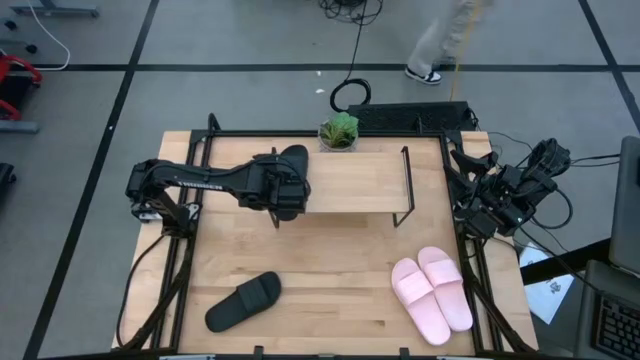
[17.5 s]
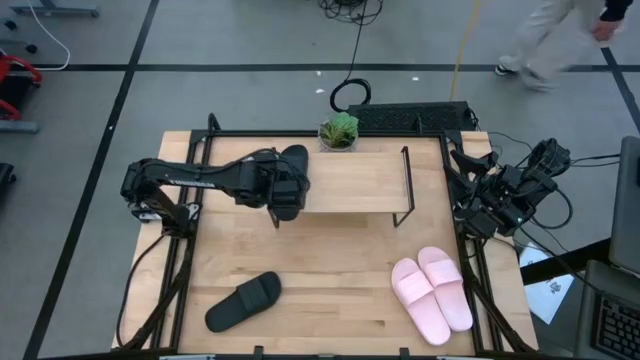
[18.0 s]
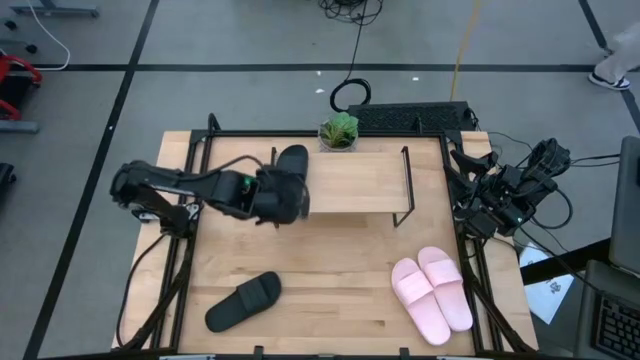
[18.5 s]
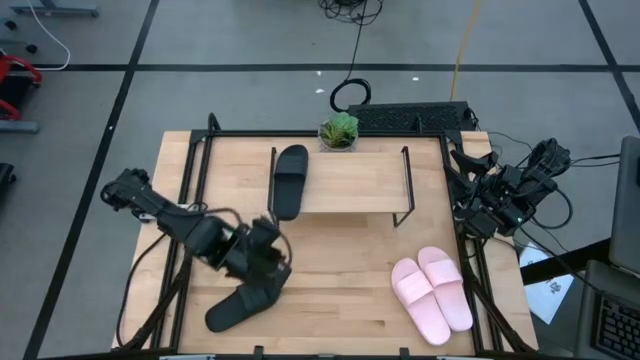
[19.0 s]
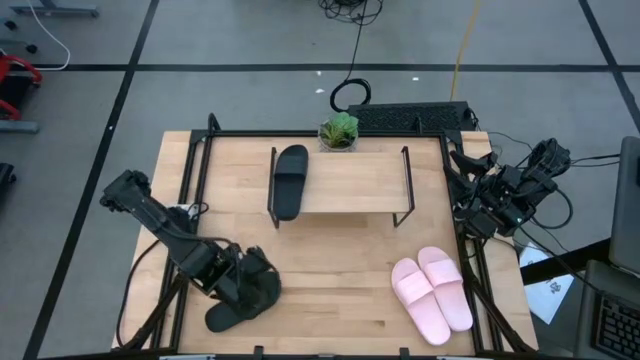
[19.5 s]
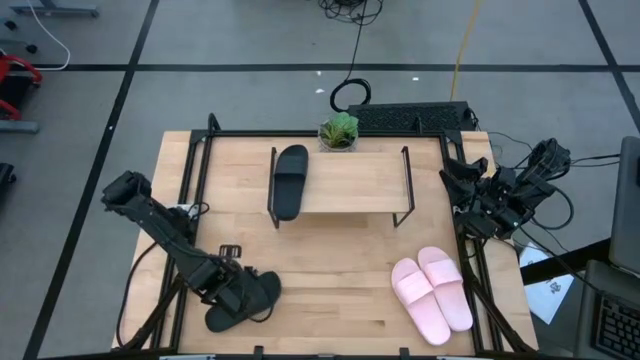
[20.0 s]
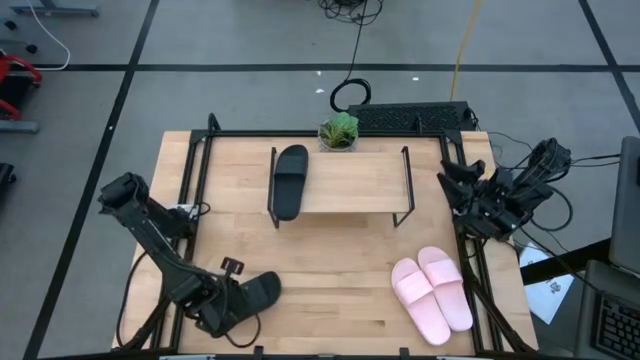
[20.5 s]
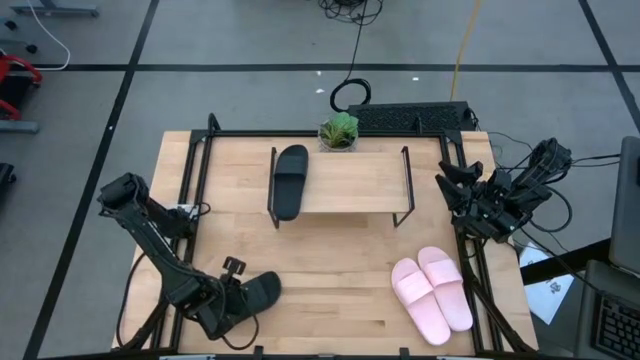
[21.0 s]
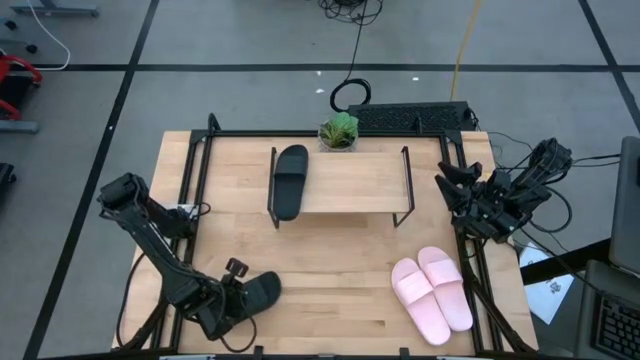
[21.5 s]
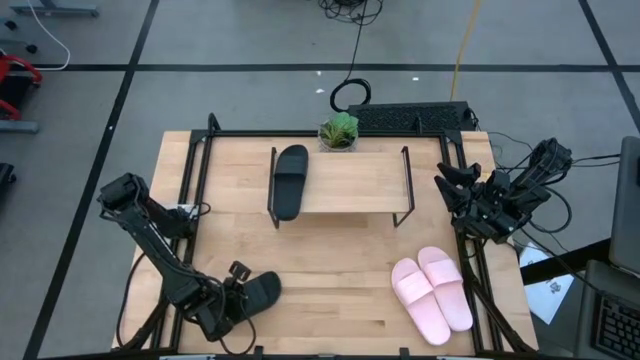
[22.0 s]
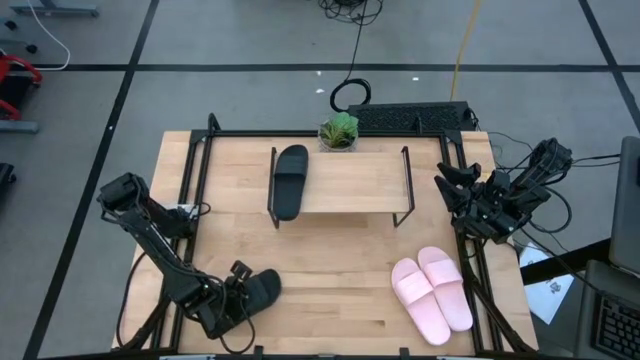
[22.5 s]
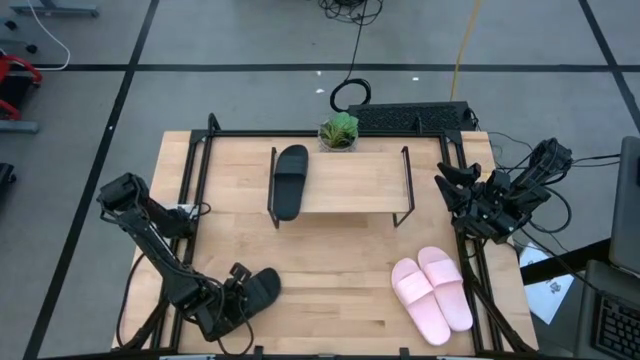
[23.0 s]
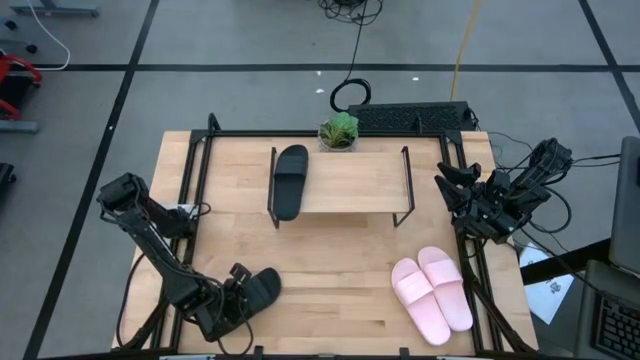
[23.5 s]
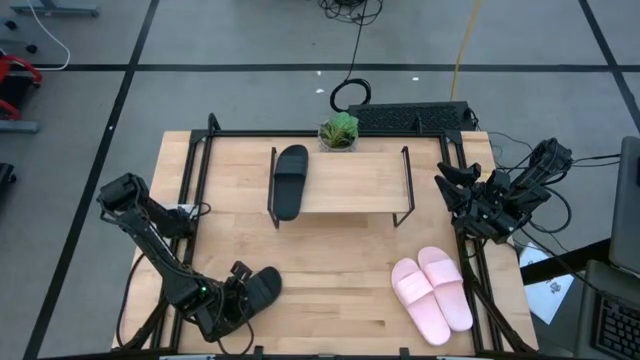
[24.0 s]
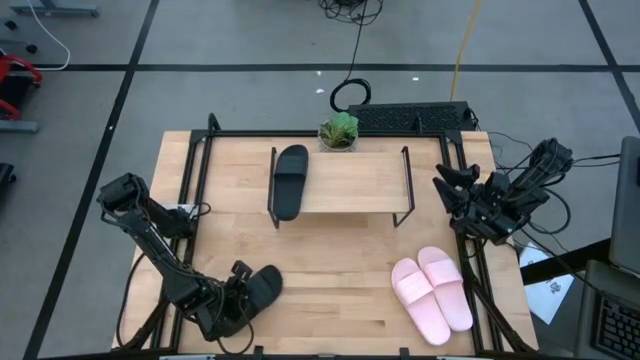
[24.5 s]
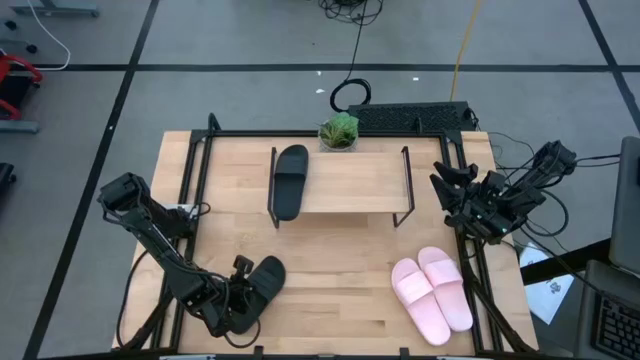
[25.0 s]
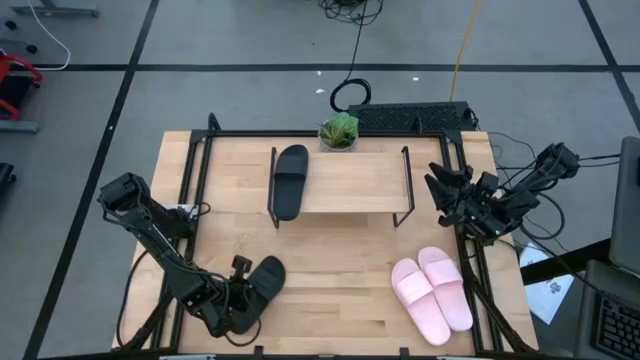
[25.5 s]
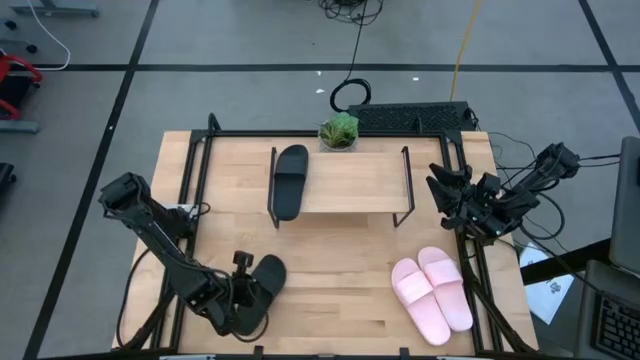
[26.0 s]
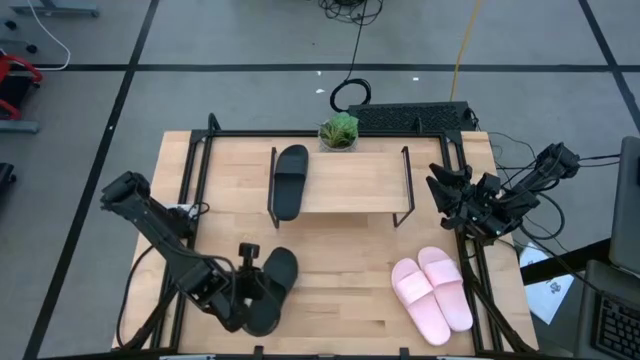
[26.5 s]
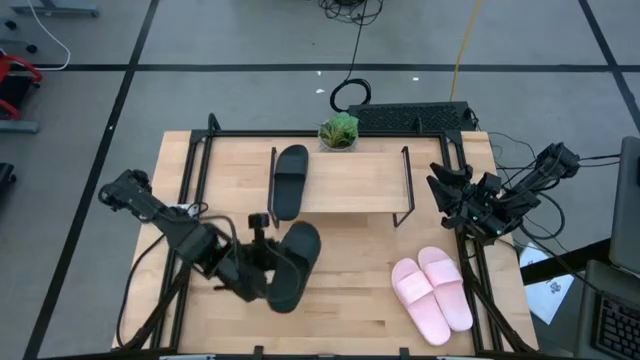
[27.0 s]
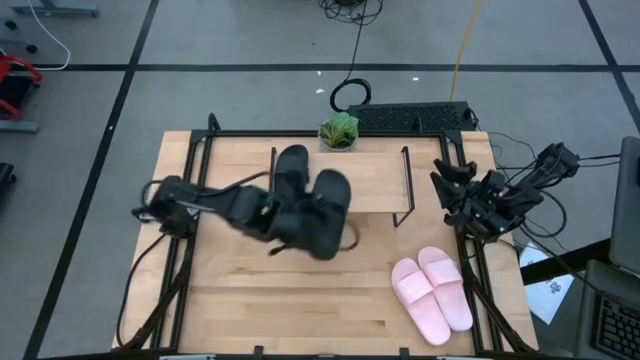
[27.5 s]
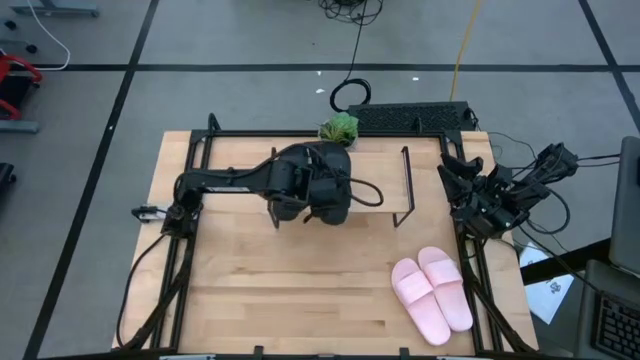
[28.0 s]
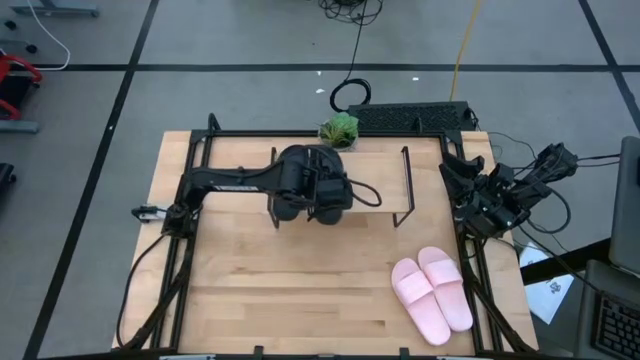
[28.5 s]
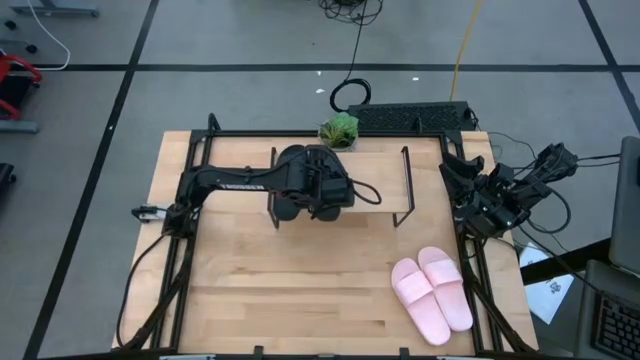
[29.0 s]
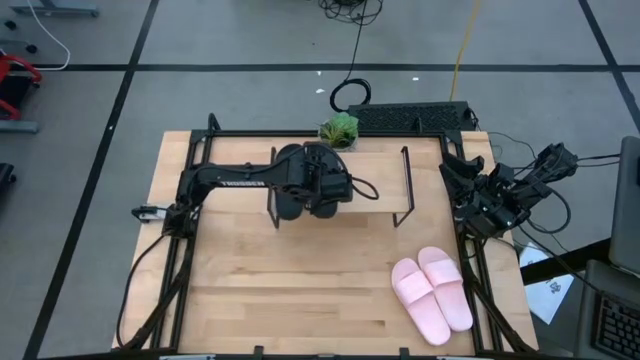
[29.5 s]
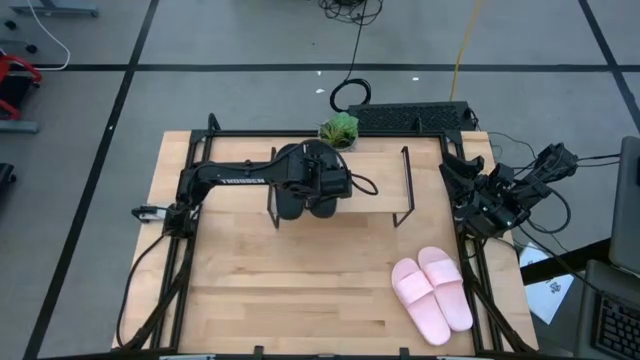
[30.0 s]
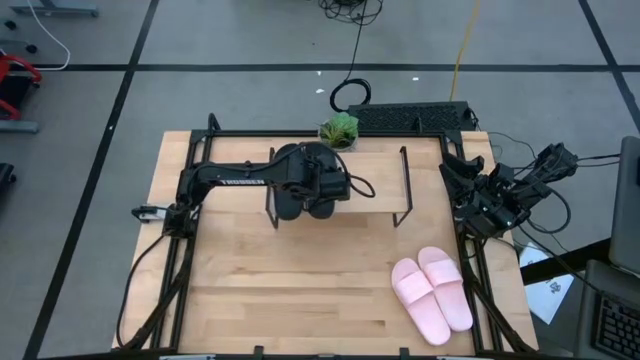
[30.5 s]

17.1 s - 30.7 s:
Task: Pick and place slides into the shelf
Put the black slipper on the shelf

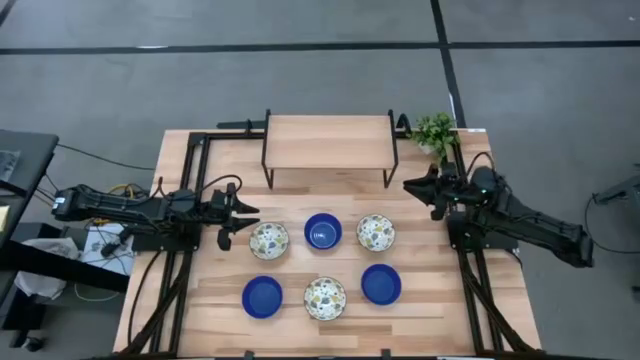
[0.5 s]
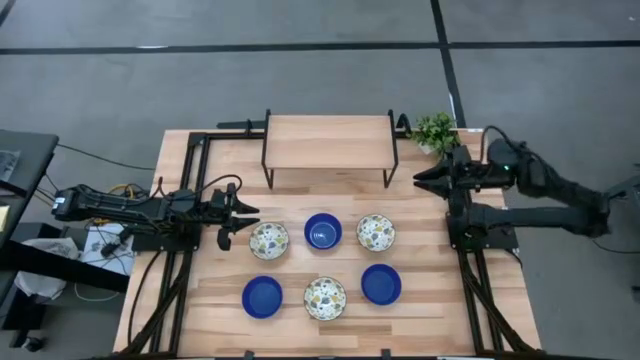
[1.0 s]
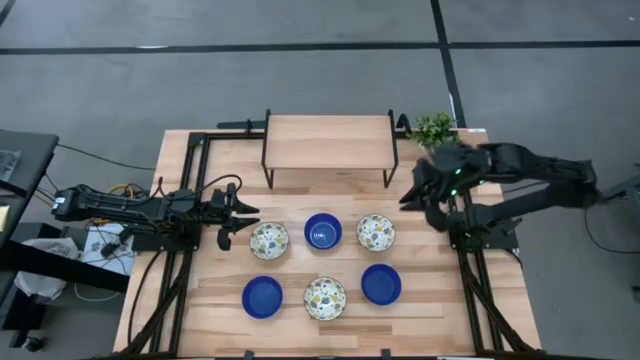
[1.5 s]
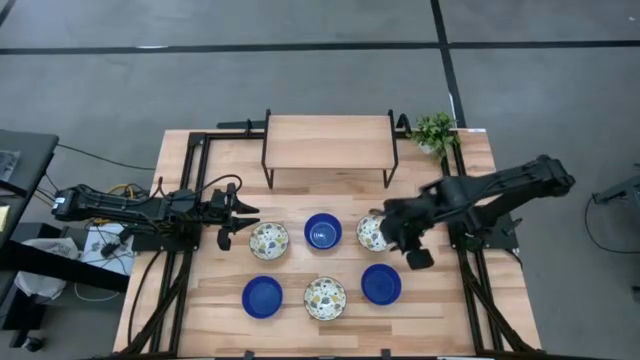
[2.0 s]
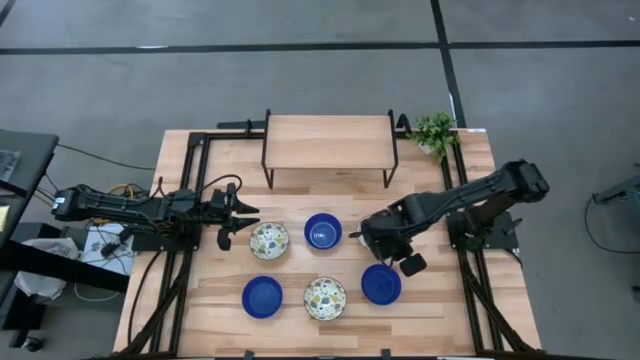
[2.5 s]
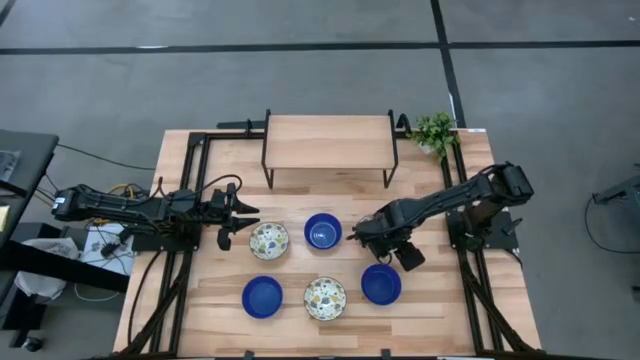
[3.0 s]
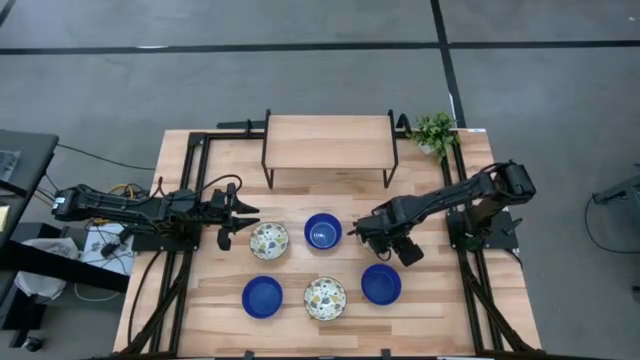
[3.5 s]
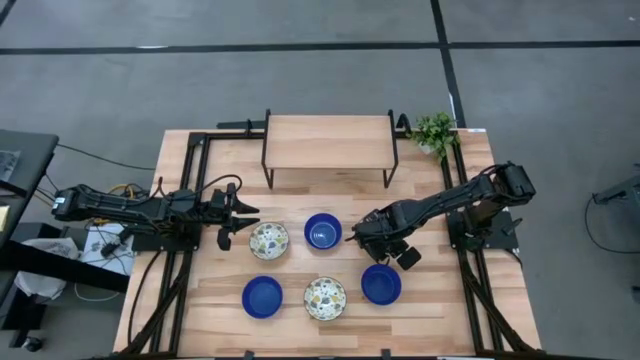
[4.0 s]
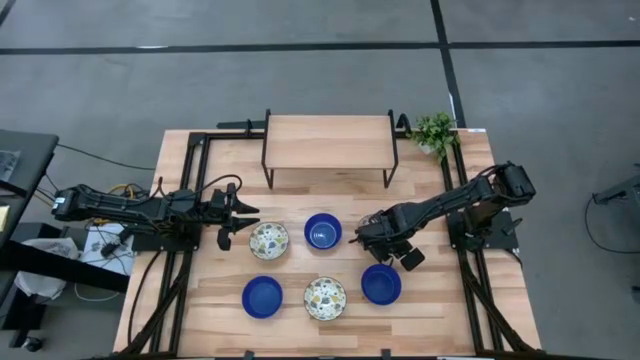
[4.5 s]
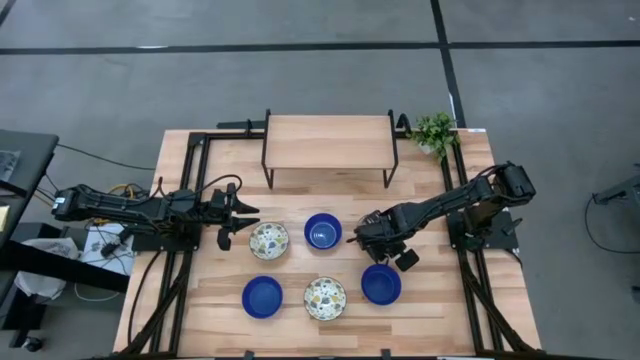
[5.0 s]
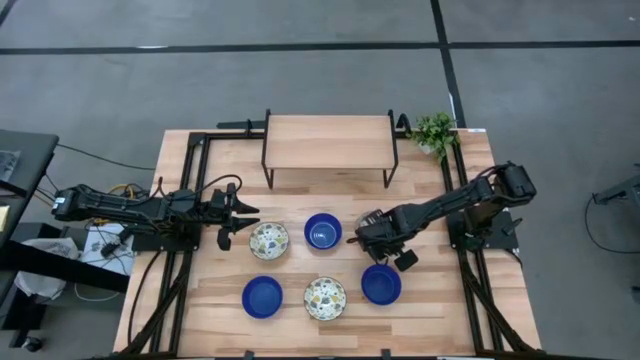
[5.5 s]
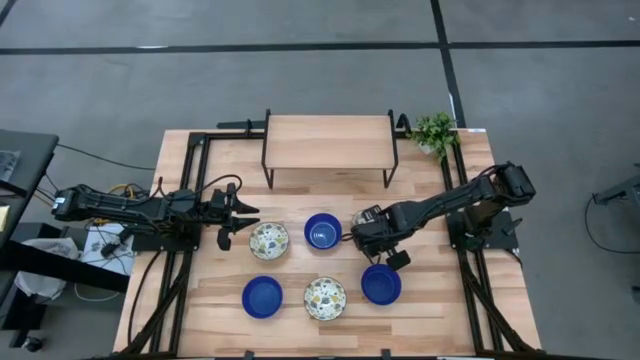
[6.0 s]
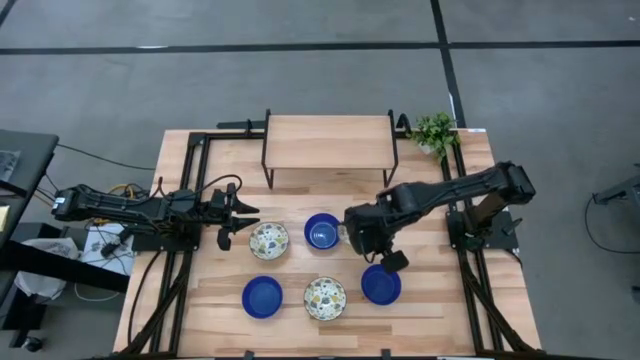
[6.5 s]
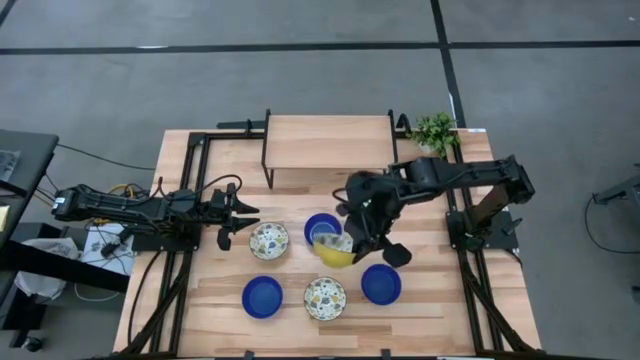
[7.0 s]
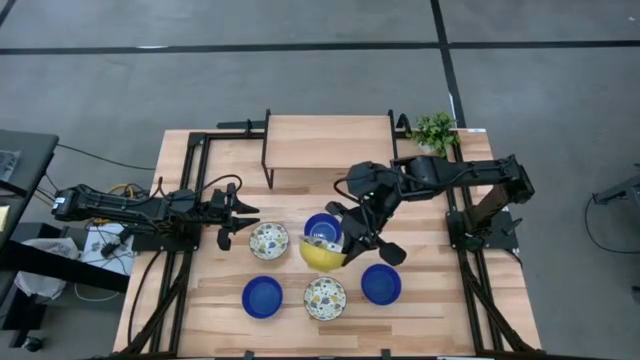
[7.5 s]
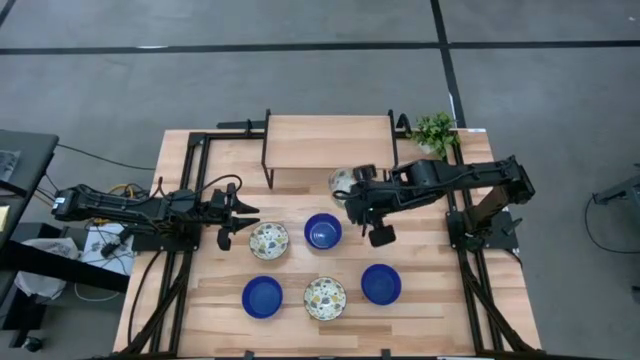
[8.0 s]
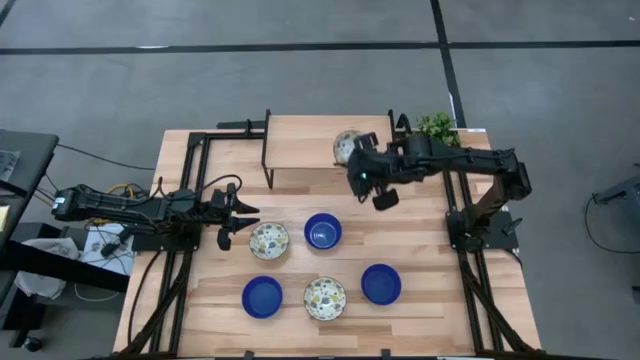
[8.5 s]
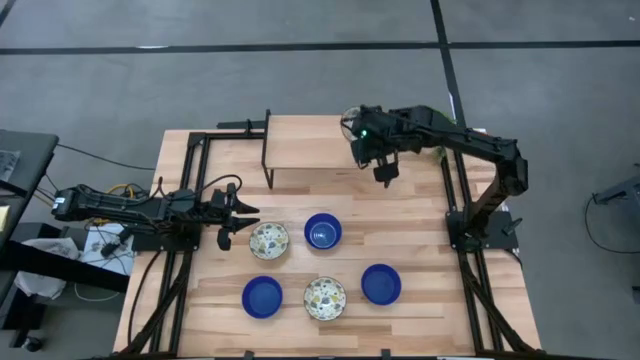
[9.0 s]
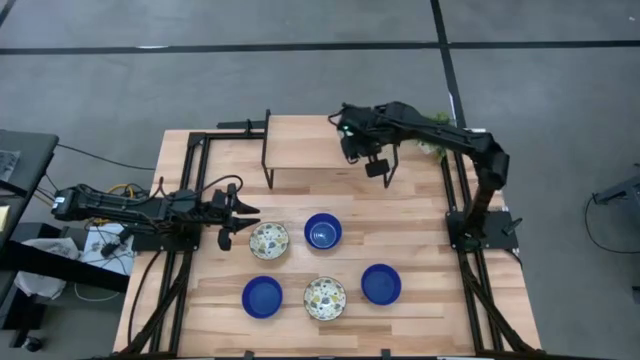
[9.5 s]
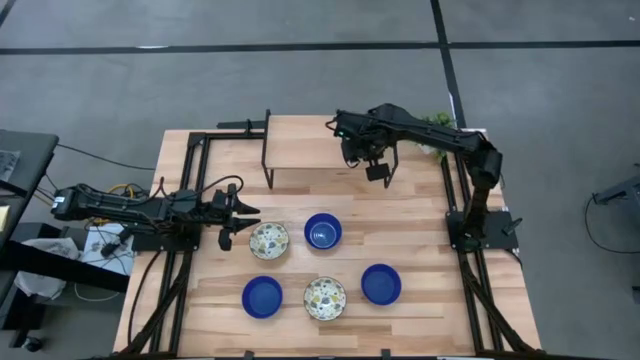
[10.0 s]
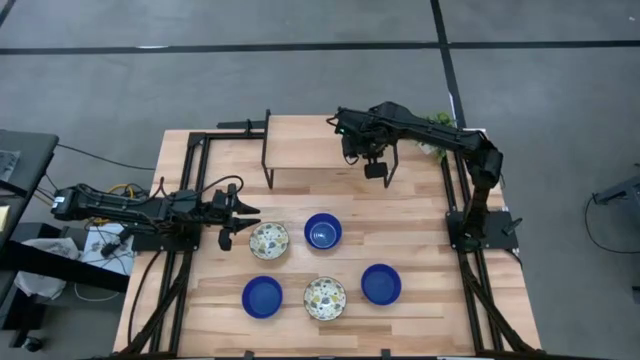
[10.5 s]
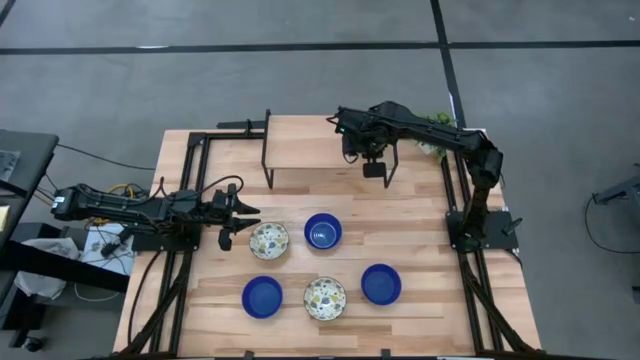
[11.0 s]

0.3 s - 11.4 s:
Task: Pick & Place Mini bowls
Put the top right yellow patterned bowl on the shelf
